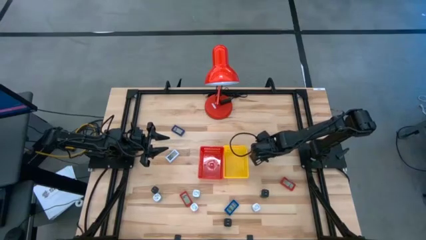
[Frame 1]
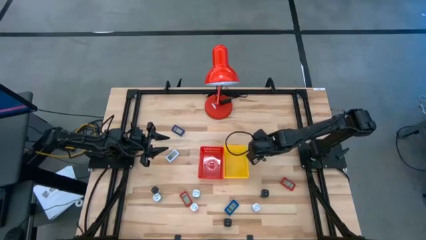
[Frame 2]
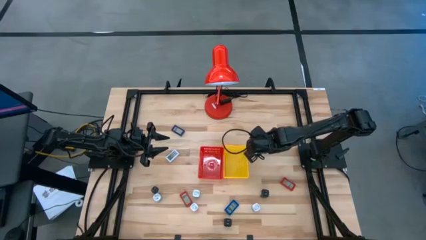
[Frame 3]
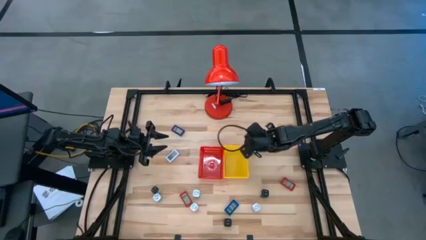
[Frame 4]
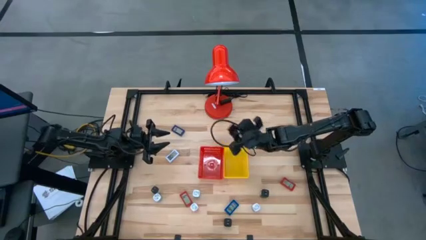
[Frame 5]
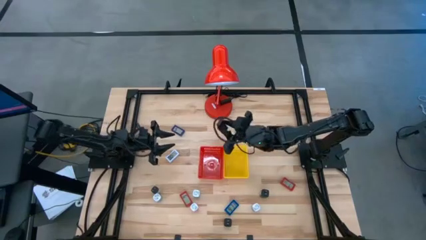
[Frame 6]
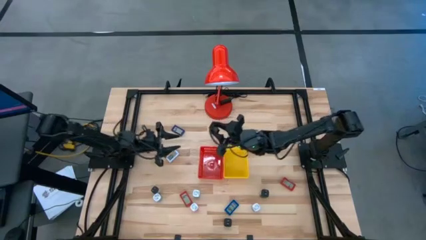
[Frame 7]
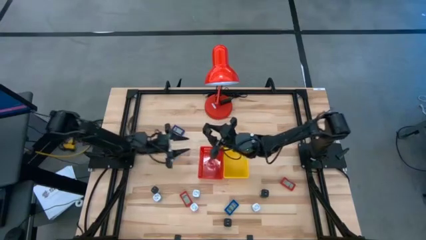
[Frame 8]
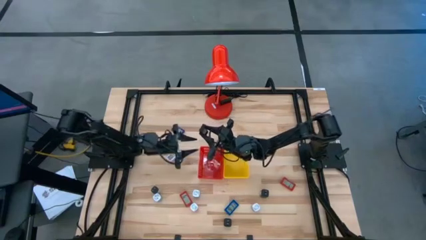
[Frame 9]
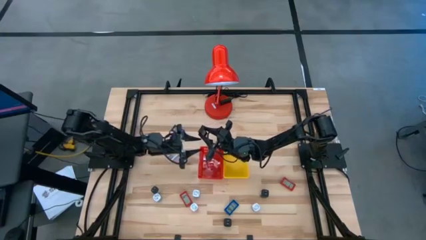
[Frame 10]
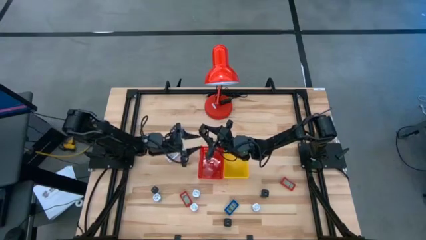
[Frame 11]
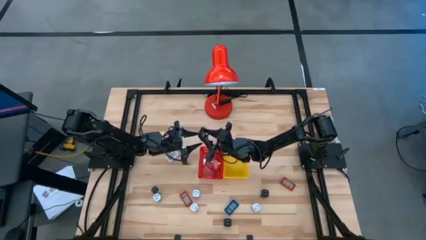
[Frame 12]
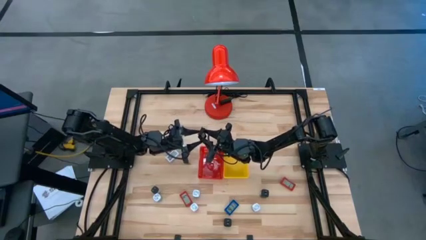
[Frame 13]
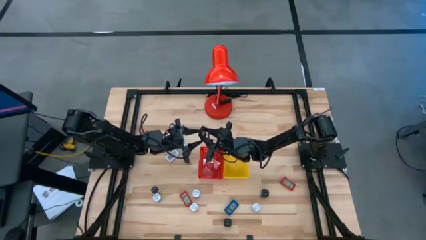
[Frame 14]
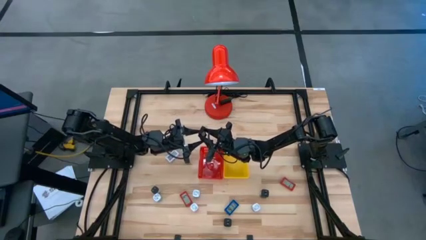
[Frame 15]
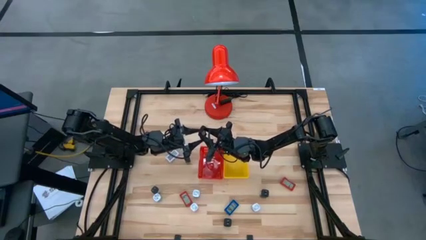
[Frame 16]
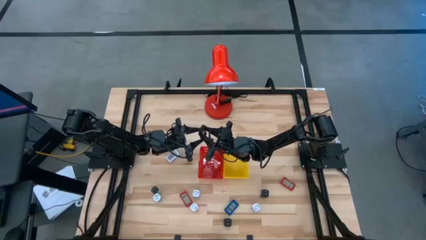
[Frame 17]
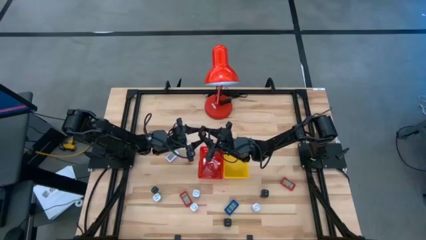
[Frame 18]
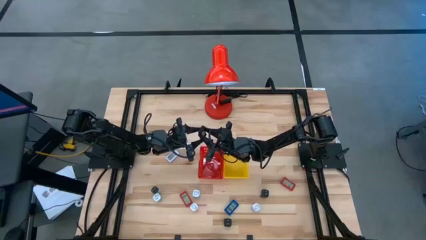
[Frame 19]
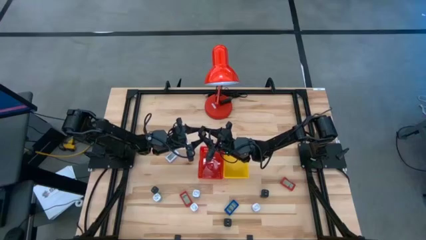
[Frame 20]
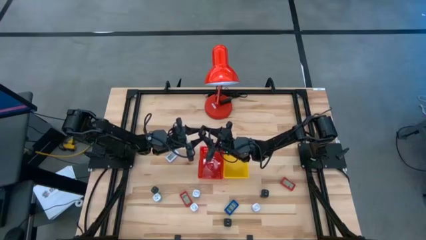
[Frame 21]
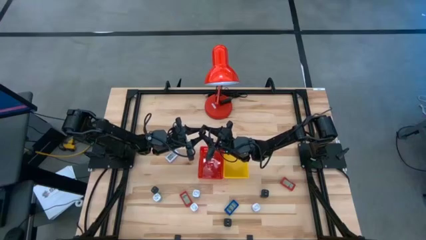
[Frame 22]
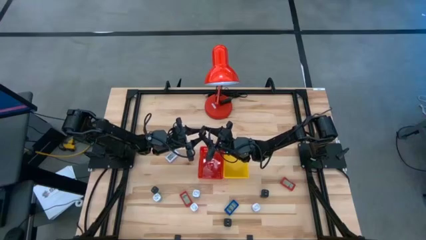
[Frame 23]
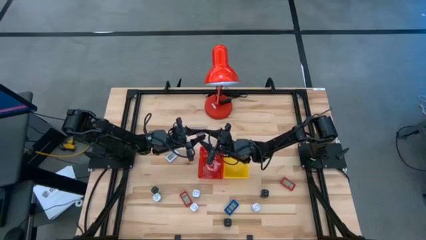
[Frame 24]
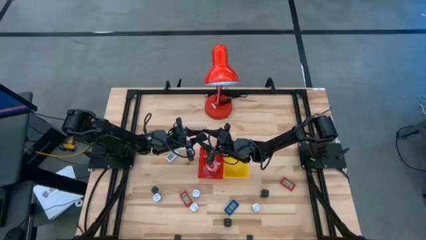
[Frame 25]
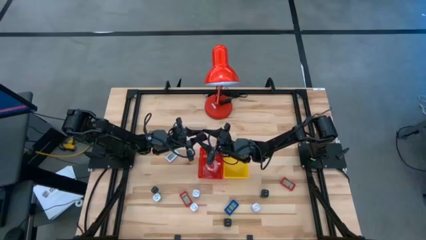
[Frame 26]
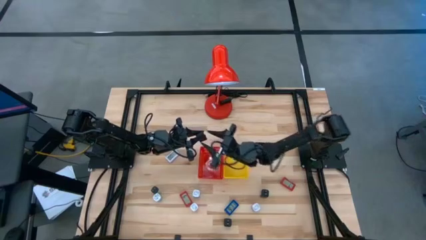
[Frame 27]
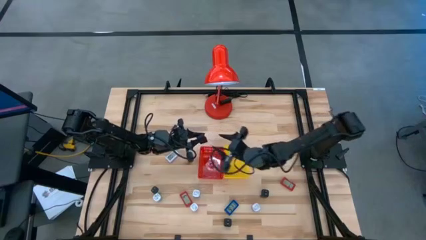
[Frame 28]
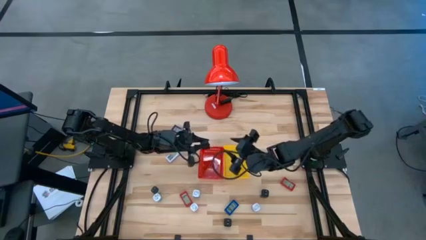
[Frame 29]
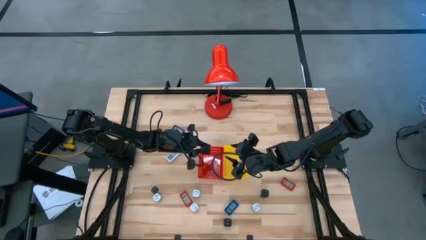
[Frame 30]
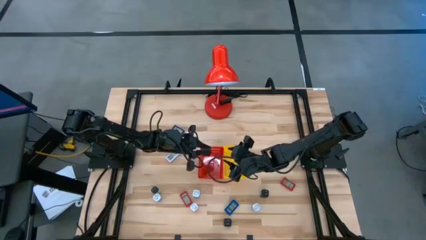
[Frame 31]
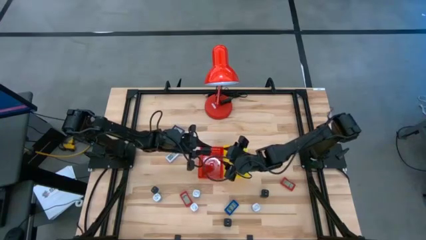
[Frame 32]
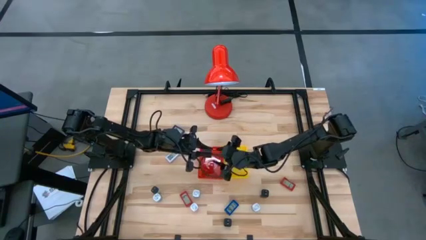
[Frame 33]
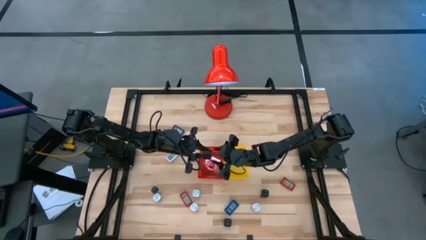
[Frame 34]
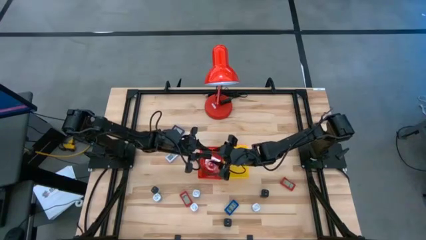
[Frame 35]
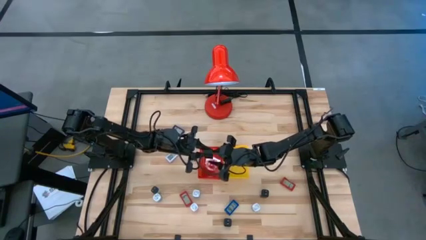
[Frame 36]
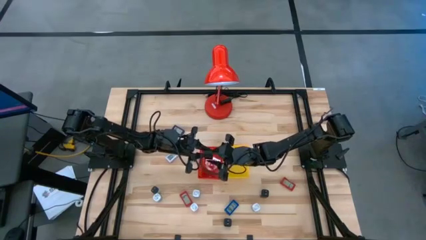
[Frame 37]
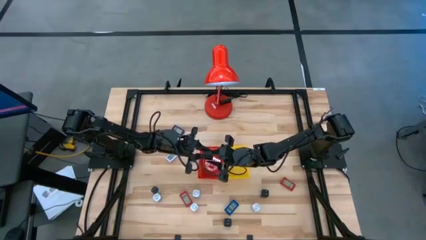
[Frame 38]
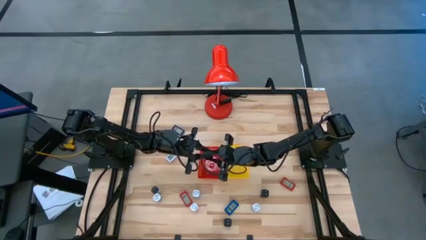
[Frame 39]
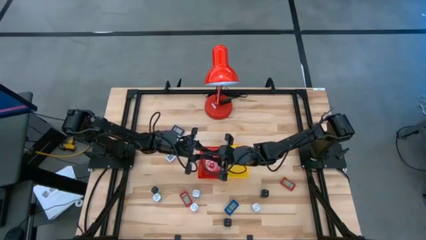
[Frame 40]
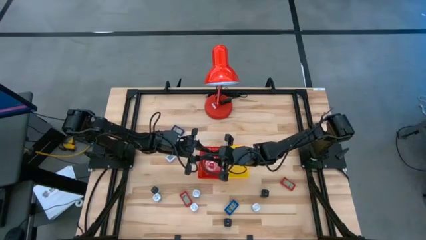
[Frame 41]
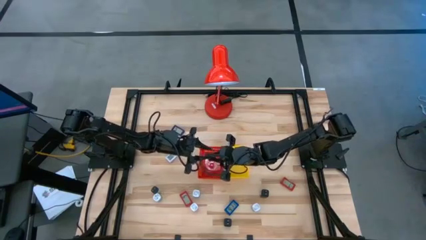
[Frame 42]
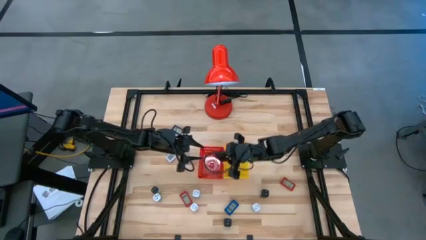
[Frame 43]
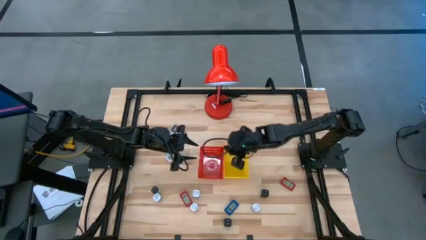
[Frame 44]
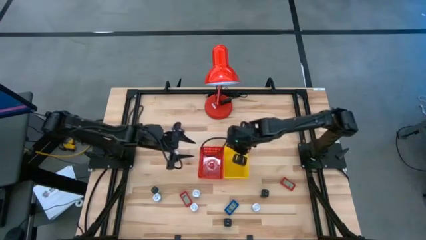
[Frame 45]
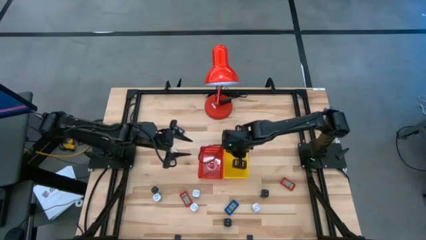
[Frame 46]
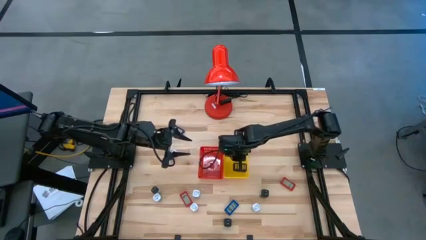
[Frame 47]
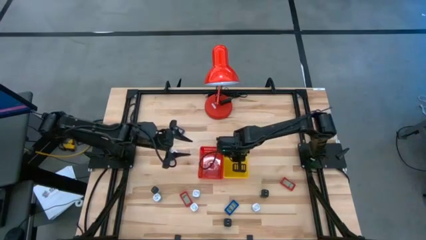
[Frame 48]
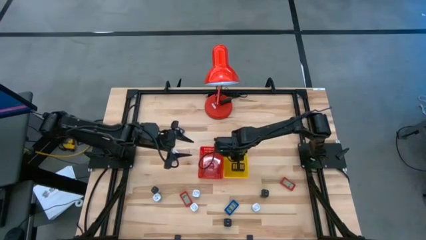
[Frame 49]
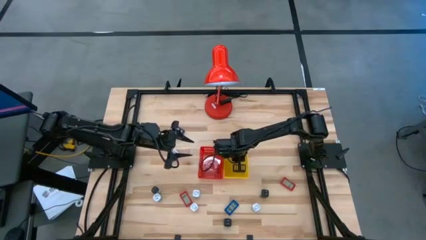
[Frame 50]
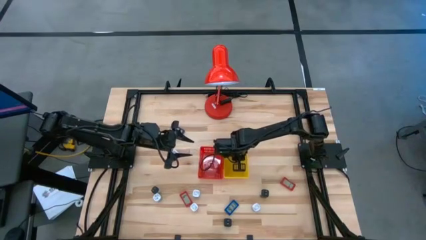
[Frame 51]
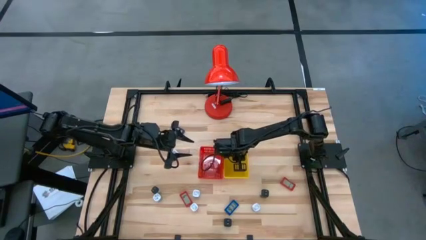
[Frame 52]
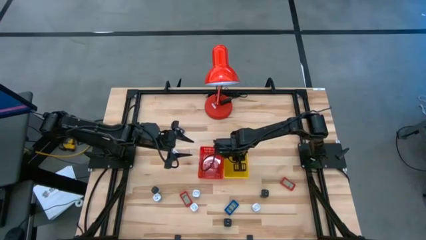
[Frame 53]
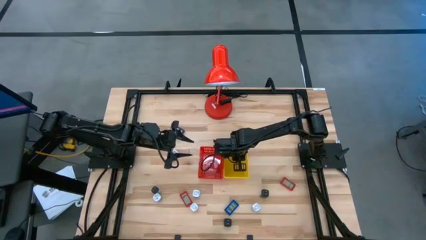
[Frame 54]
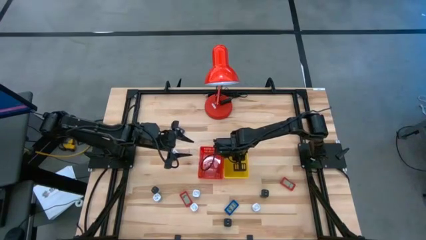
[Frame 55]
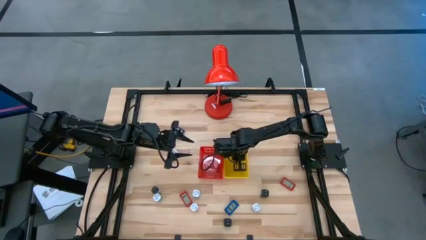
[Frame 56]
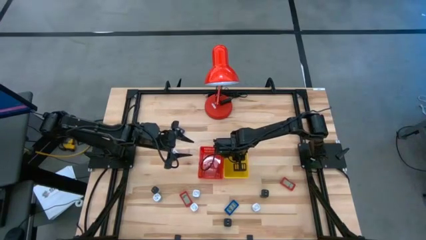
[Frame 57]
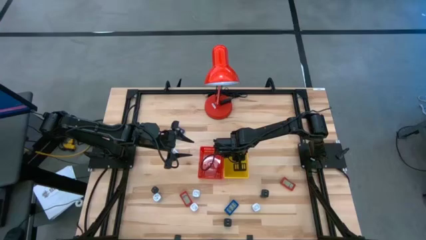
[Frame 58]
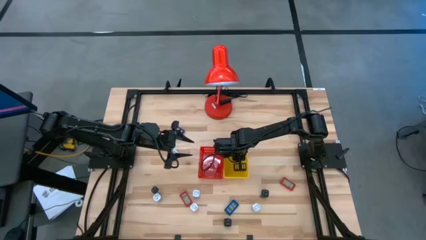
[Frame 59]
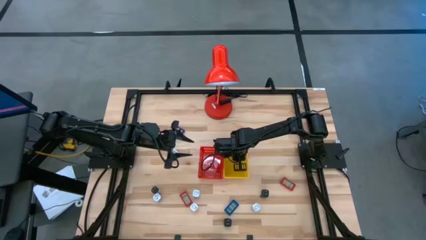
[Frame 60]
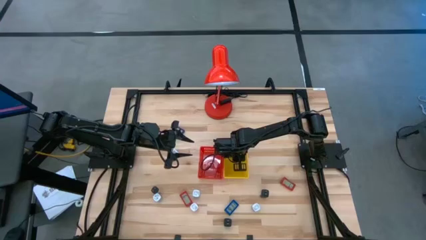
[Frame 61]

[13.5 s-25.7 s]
Task: Pick & Place Office items
Put the black digital timer into the yellow bin
